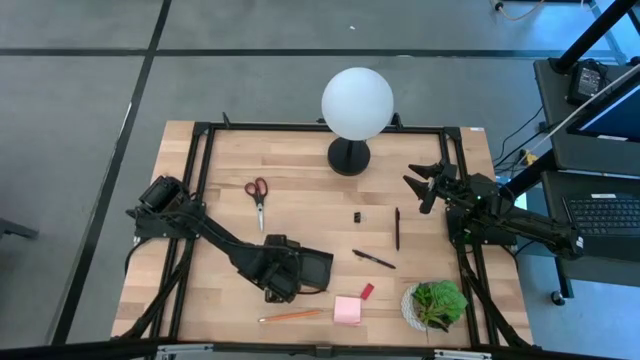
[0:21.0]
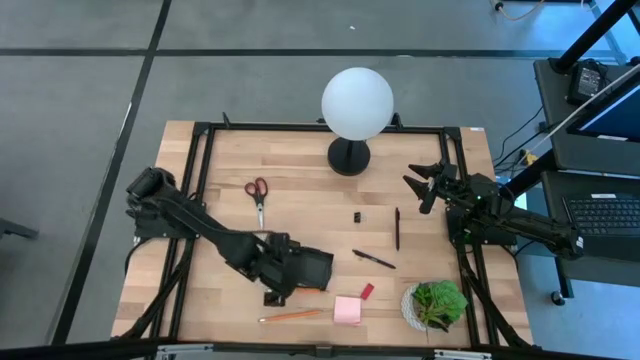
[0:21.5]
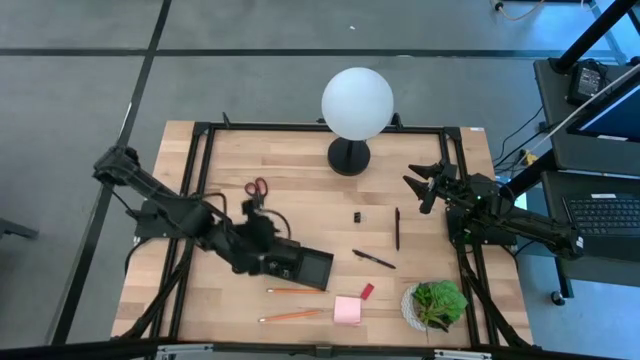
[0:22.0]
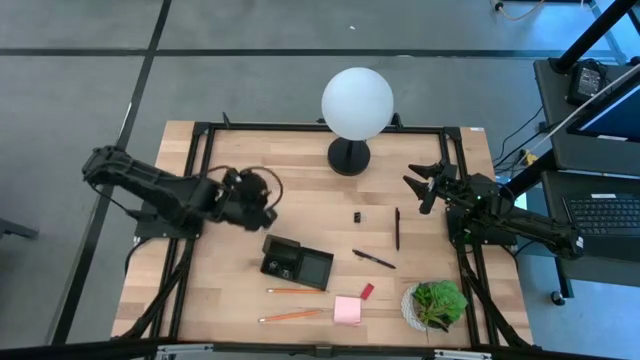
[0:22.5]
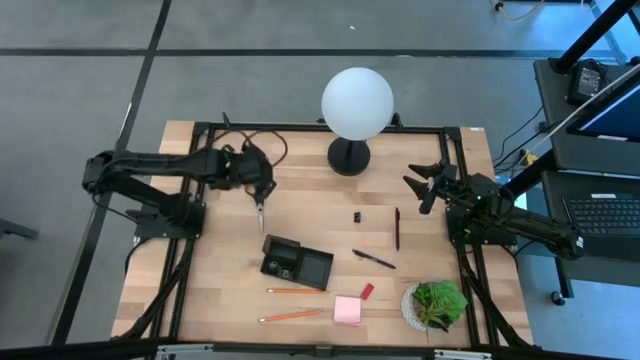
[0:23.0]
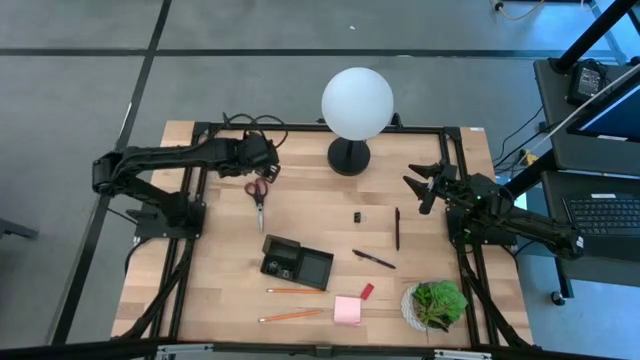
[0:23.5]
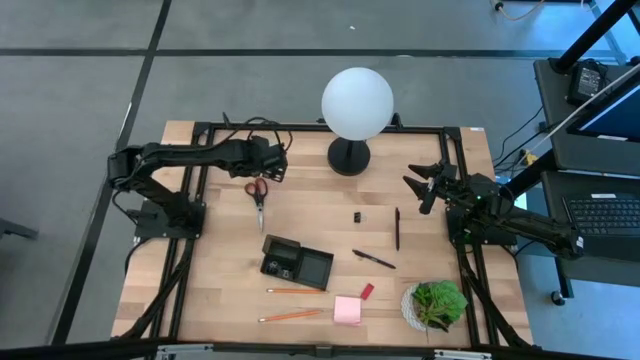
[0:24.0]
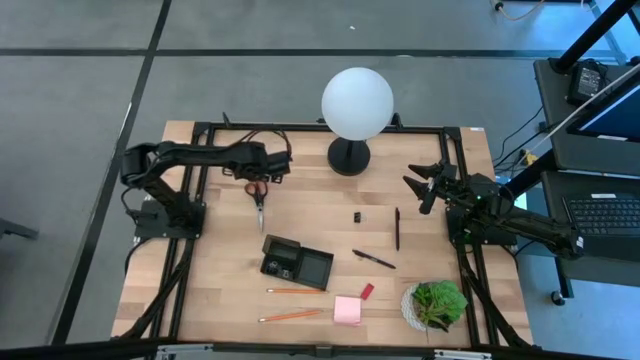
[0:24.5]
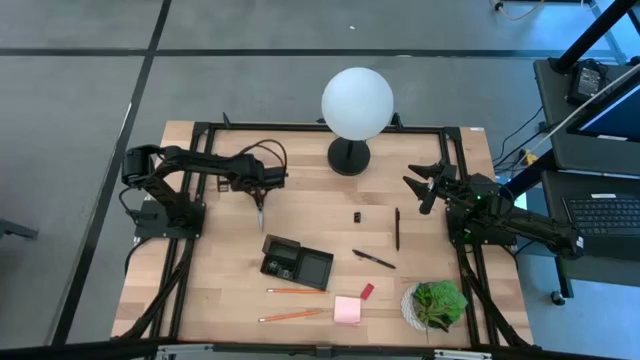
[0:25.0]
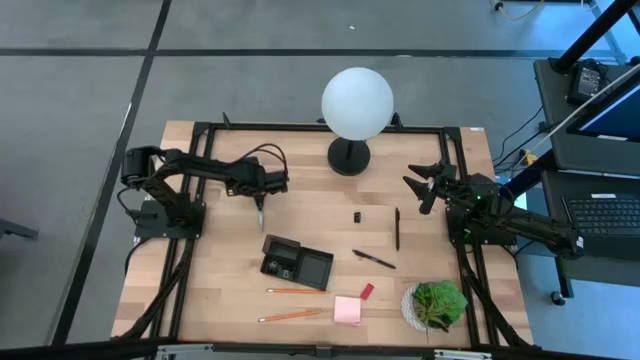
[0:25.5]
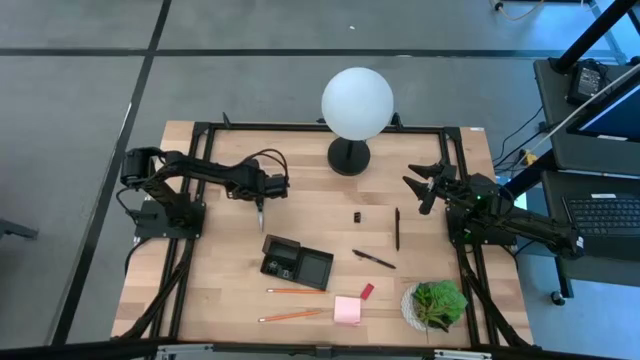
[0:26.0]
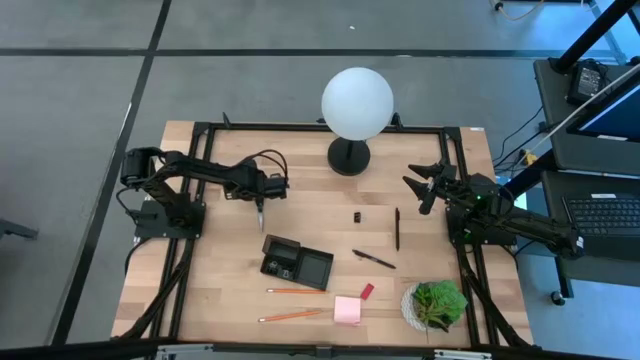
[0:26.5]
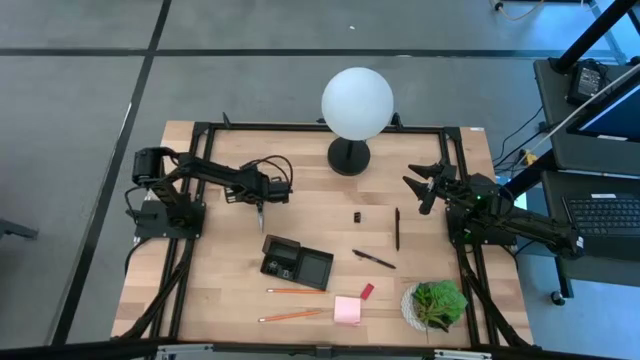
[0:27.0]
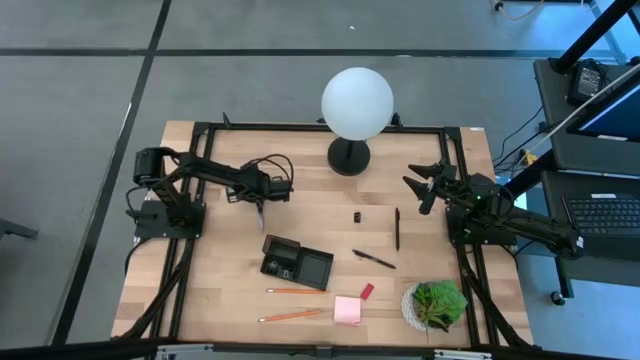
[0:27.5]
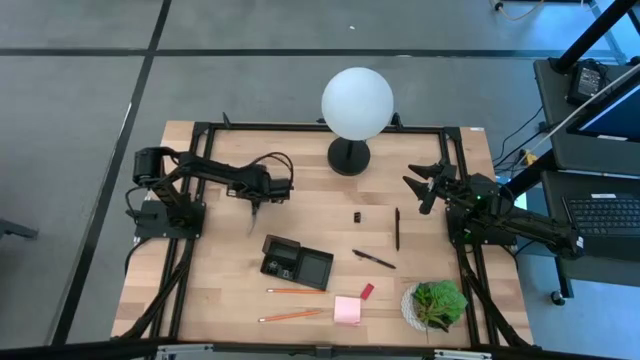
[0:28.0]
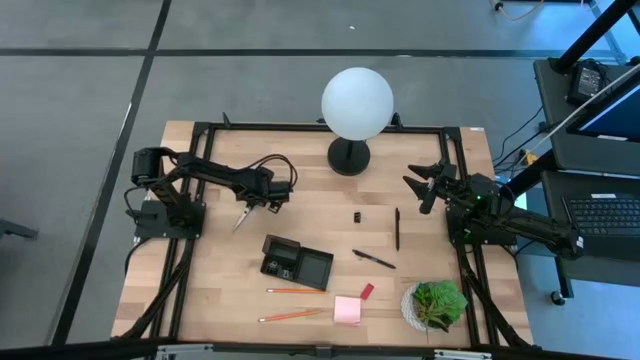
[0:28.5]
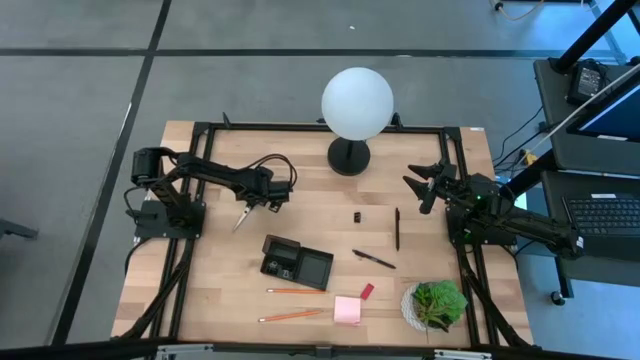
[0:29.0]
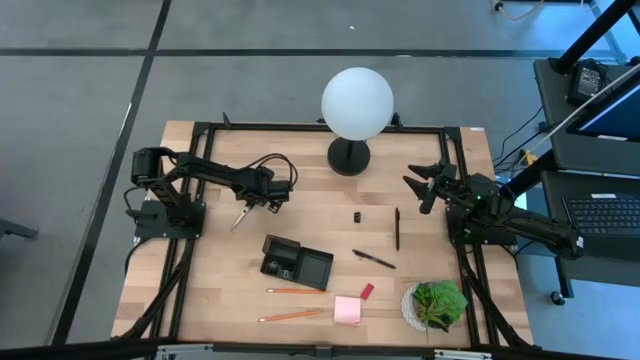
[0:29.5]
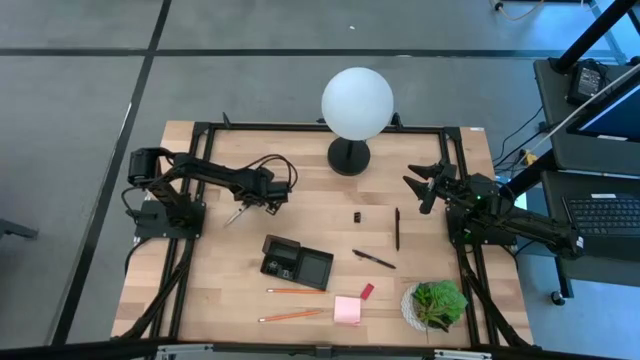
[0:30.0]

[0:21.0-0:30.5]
Task: Pick and place office supplies into organizer
Put the black scissors into the black desk organizer

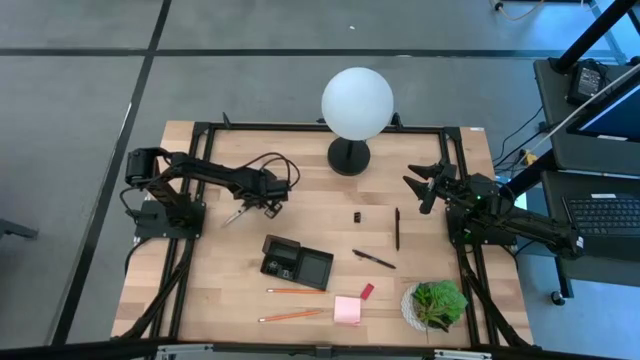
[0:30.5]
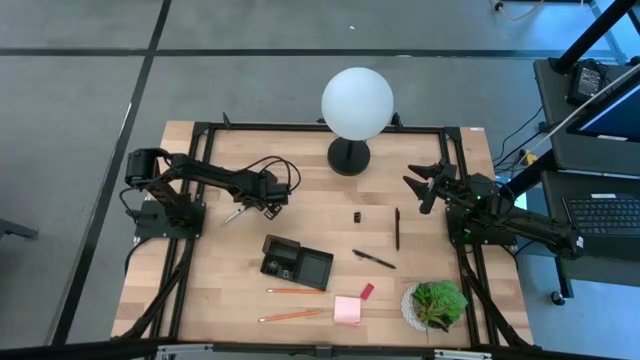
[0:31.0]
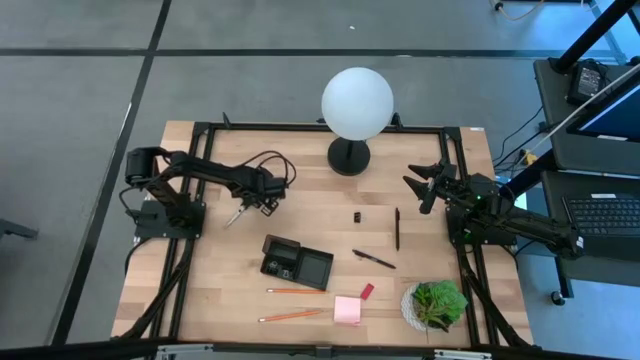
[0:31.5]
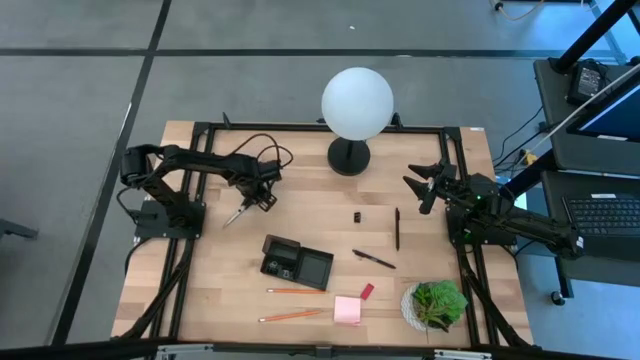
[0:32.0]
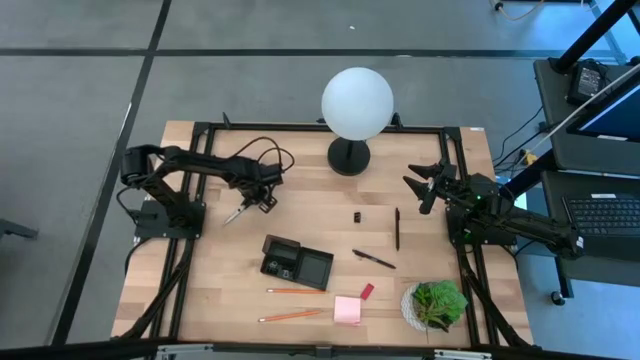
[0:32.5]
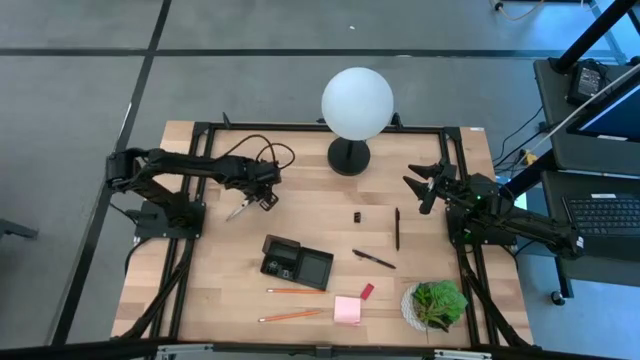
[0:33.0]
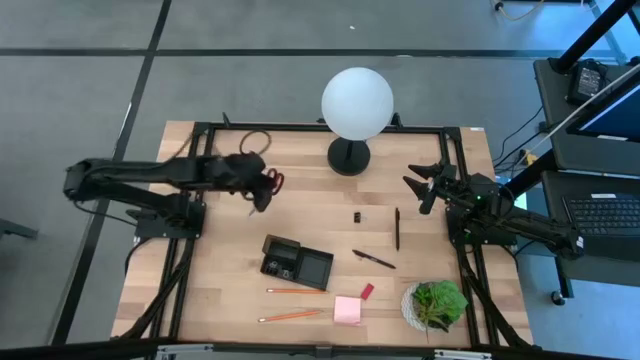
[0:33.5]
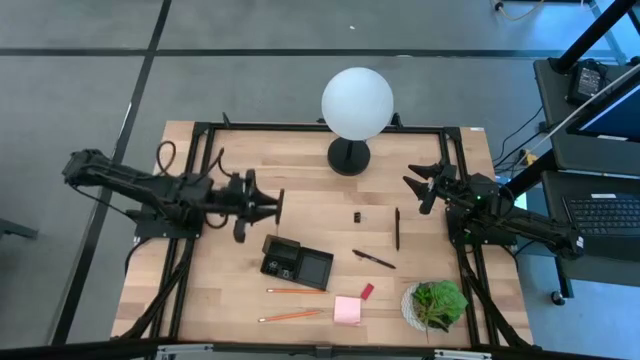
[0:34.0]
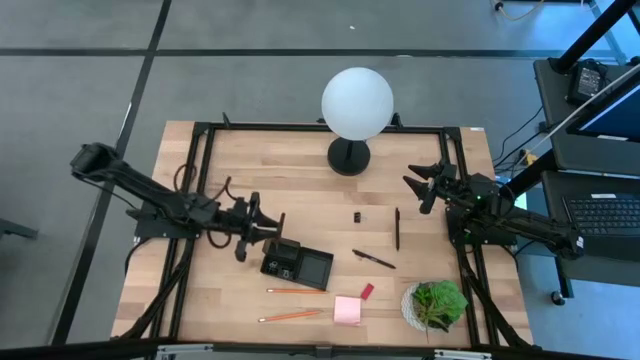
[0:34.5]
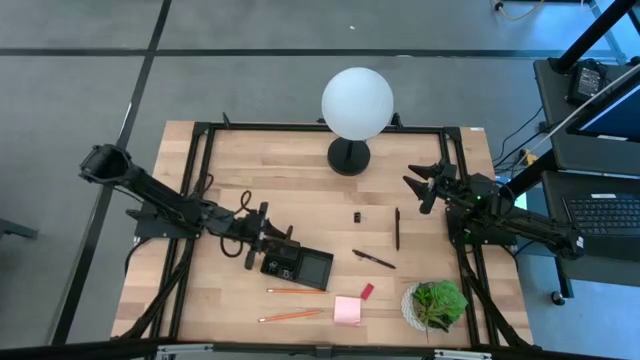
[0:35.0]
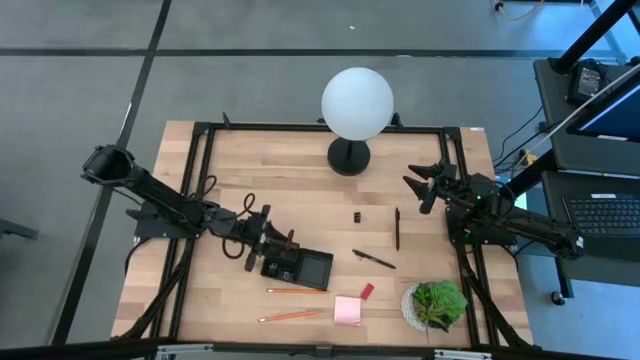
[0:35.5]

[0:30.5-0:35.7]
Put the black scissors into the black desk organizer

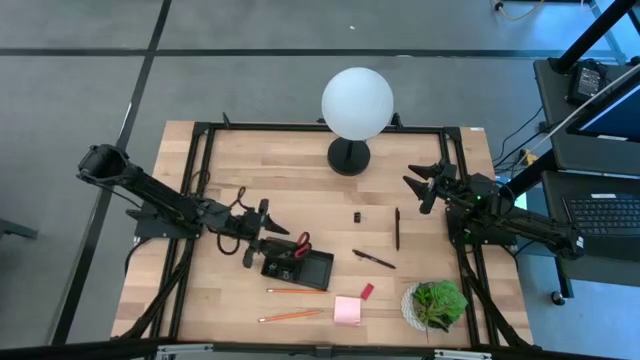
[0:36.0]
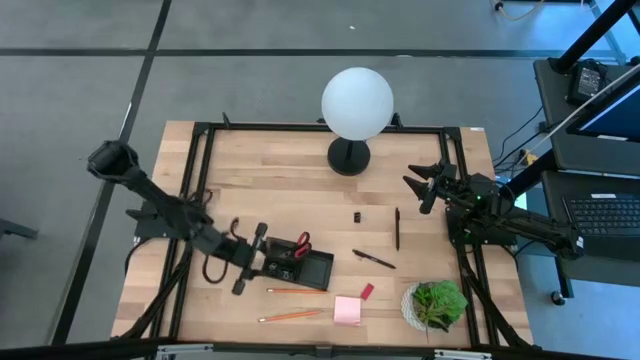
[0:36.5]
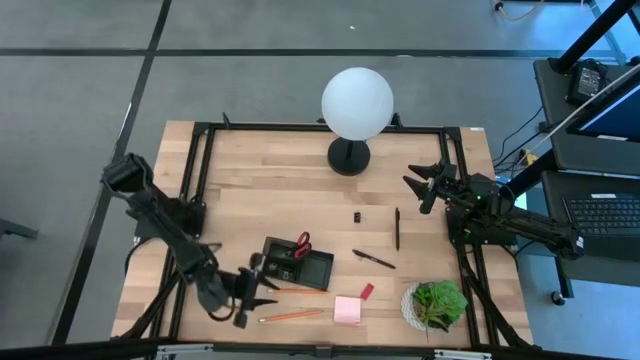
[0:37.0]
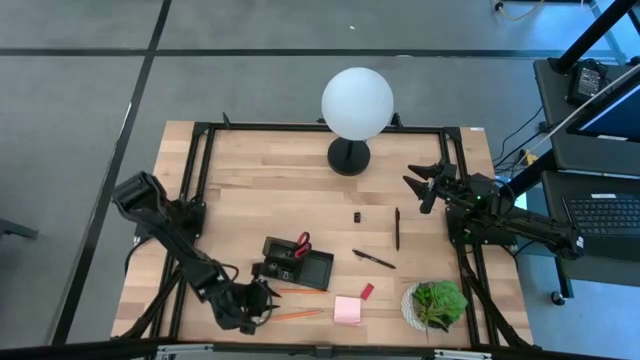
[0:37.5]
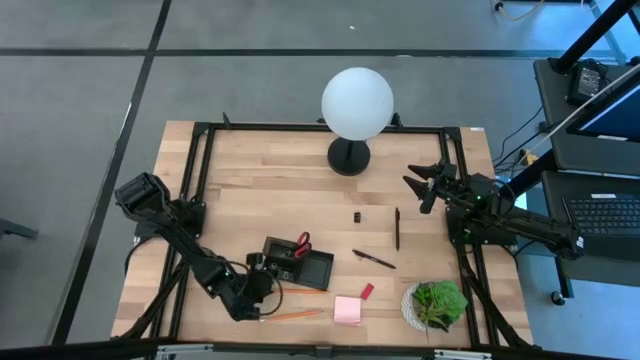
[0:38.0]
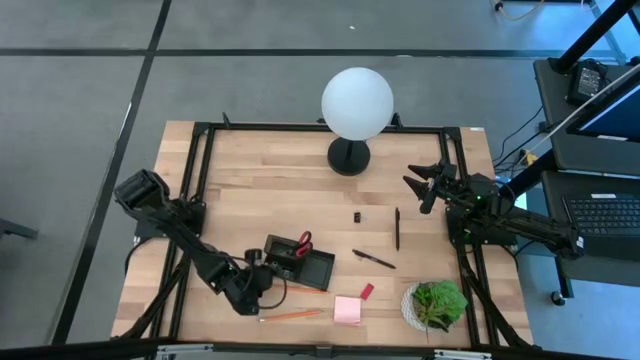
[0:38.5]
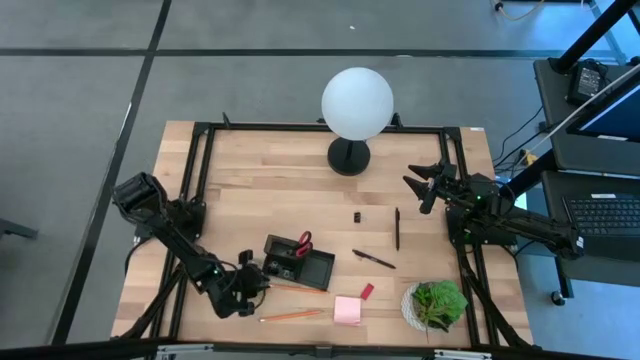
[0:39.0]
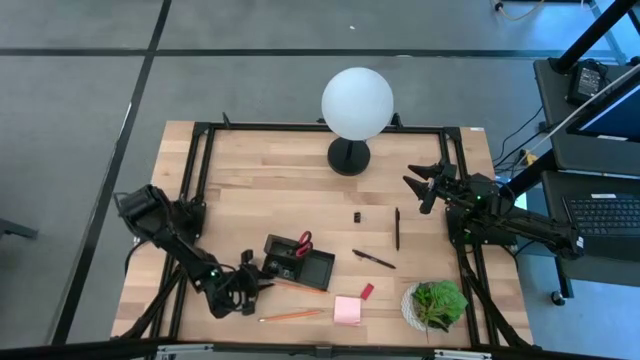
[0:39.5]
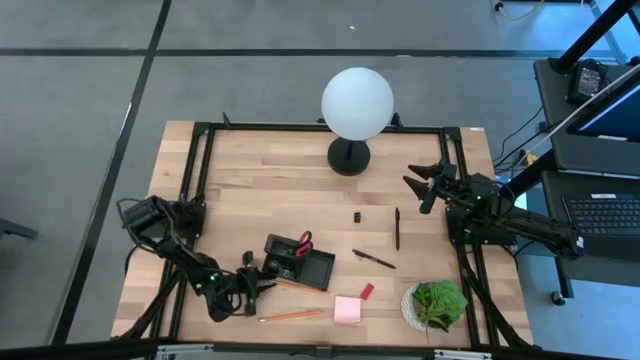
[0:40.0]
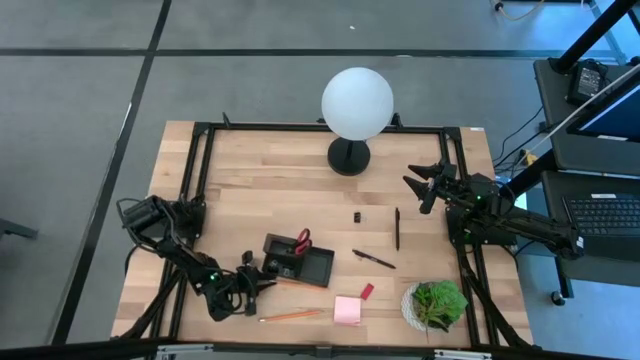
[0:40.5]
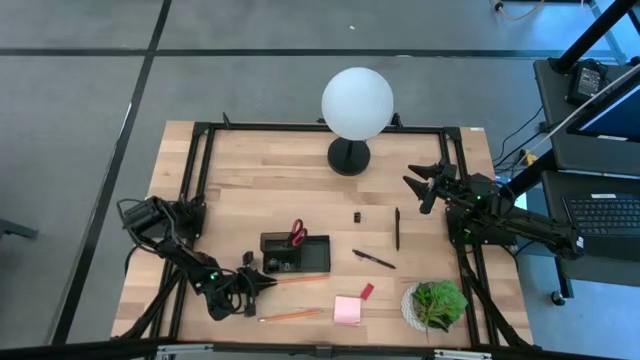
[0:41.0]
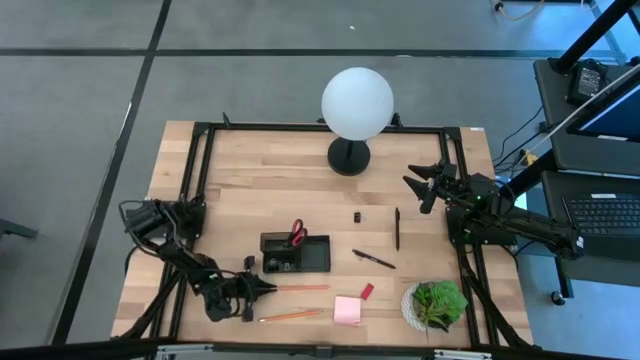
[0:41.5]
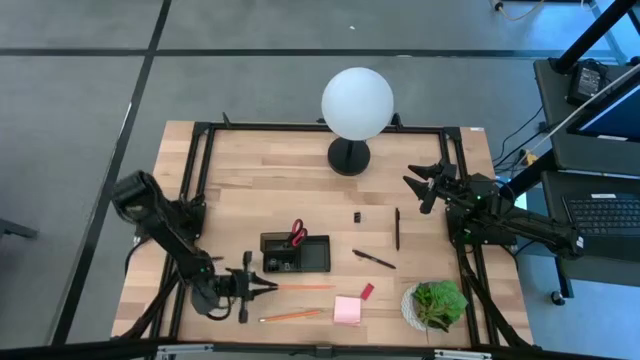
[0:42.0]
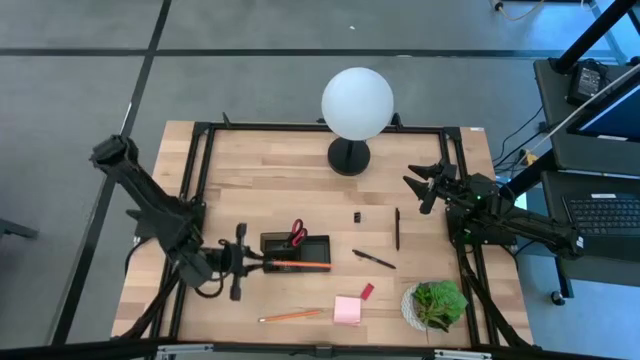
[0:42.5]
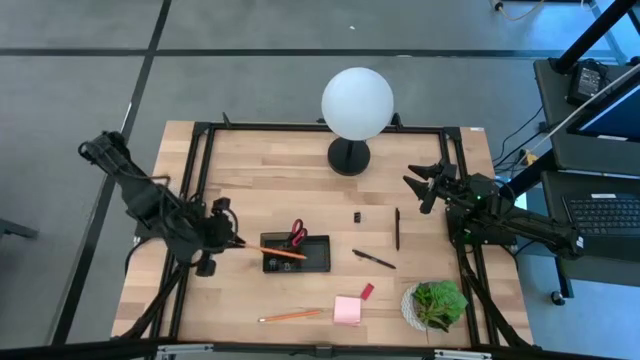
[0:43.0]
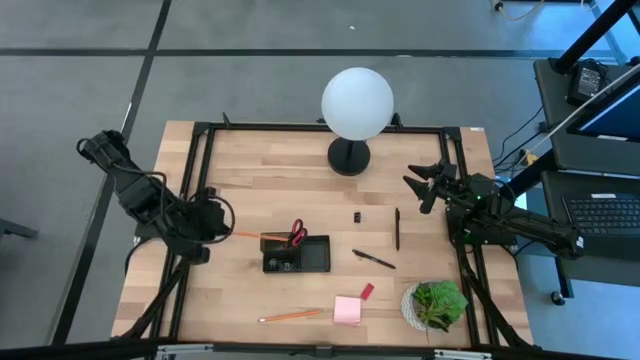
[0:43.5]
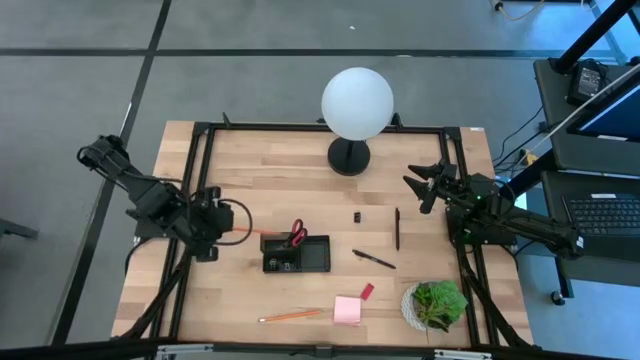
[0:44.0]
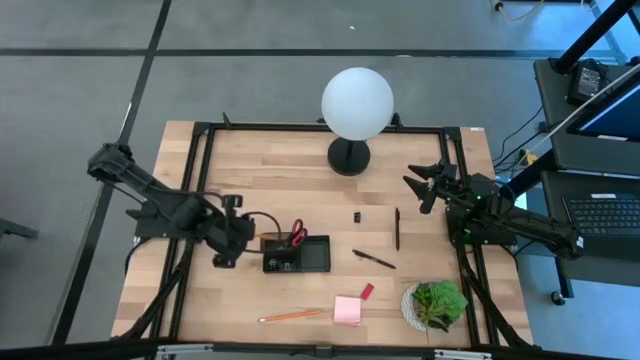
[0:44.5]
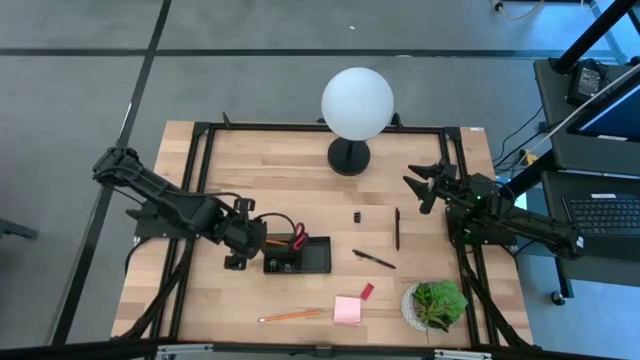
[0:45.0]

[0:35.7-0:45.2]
Put the top orange pencil into the black desk organizer
